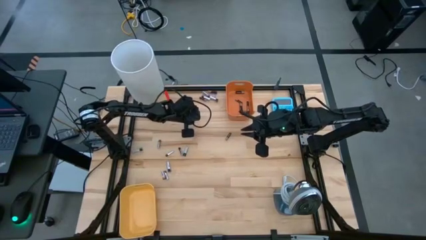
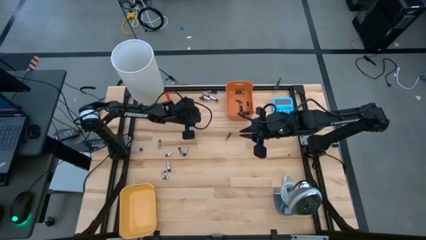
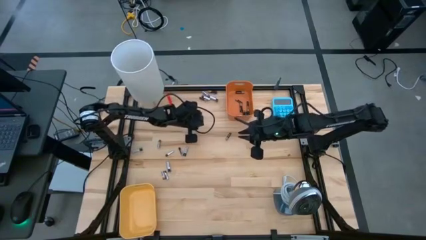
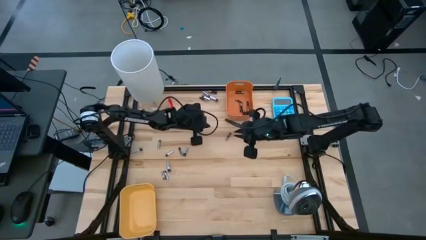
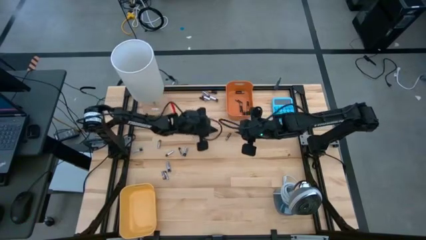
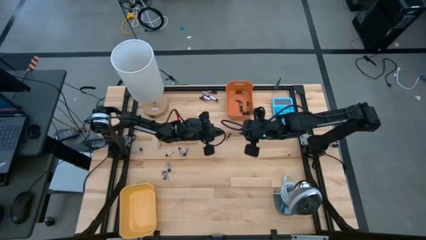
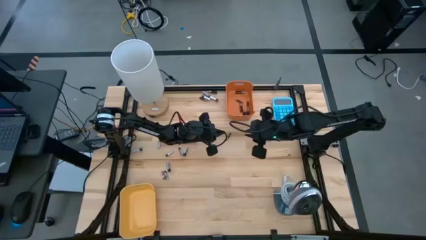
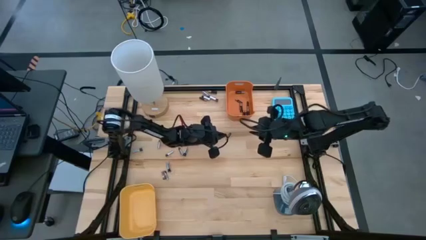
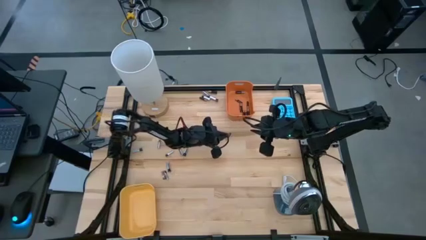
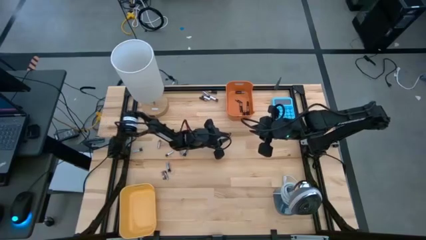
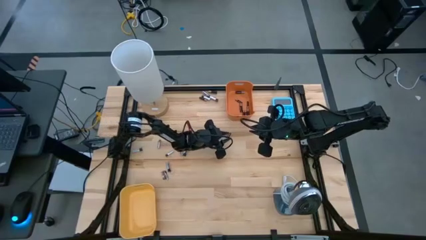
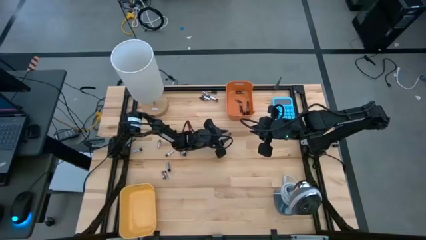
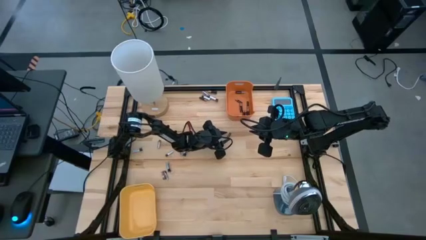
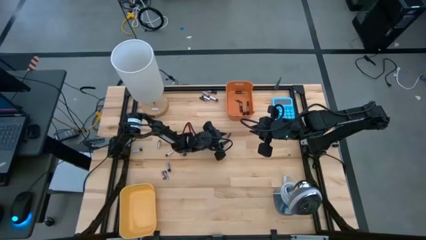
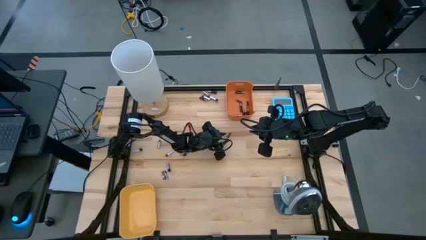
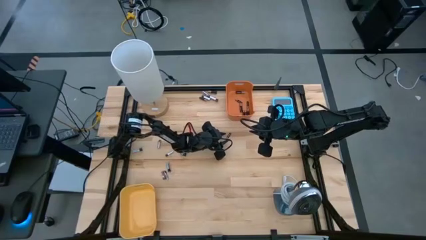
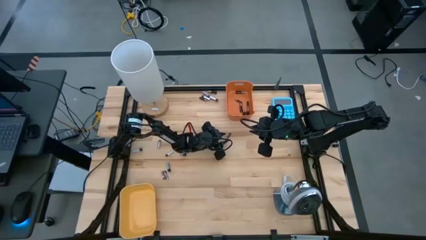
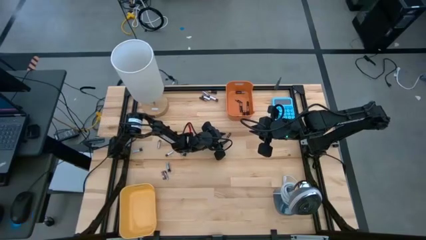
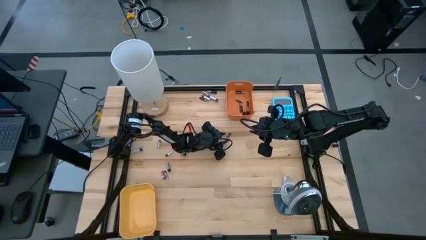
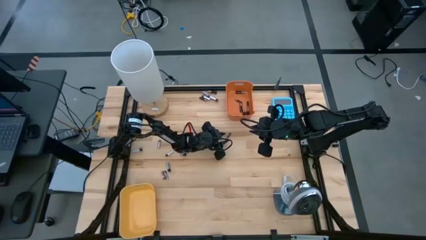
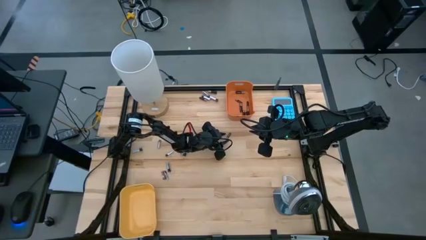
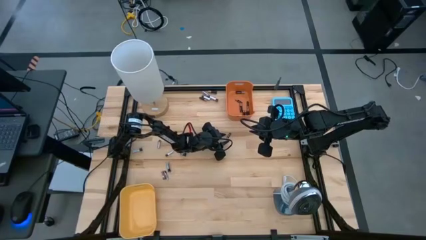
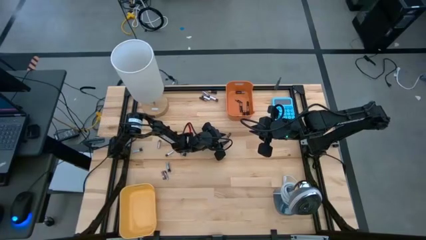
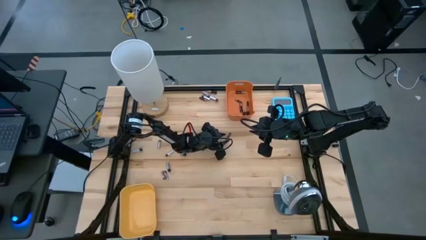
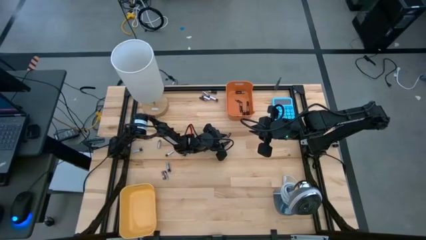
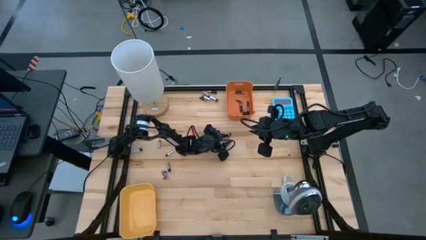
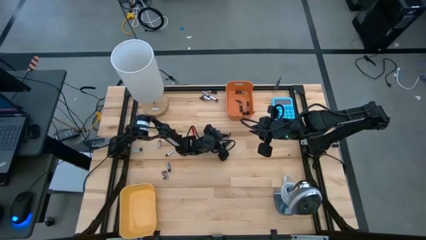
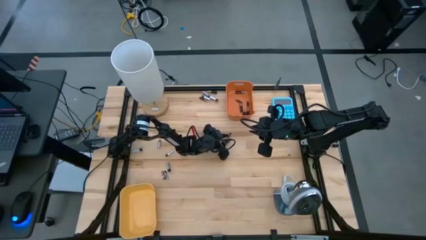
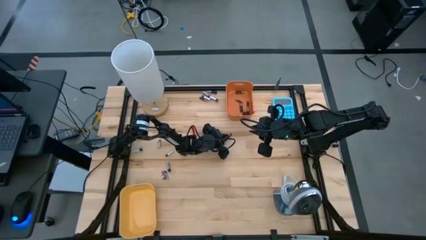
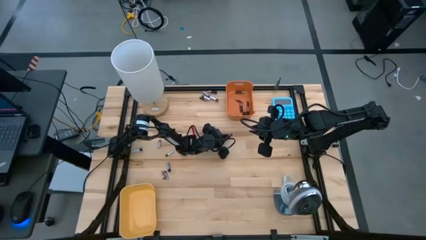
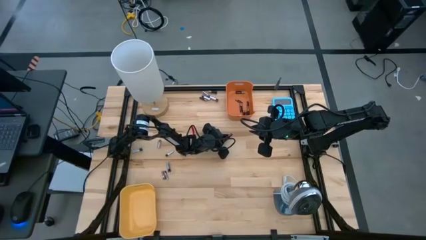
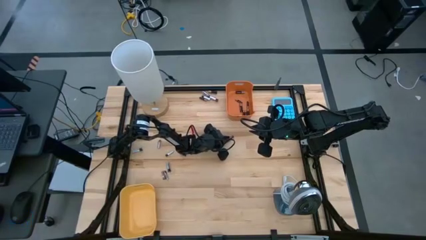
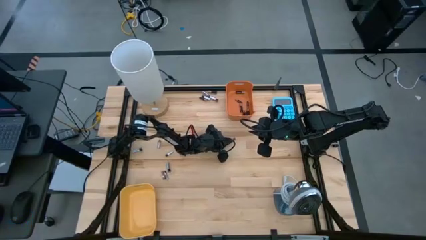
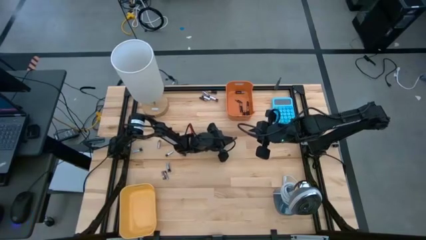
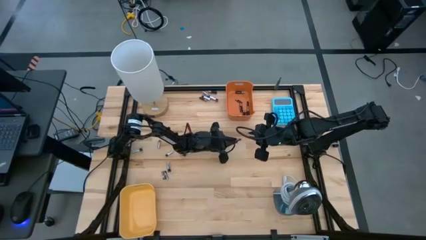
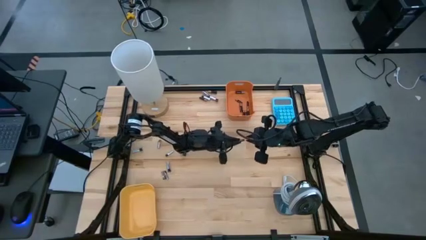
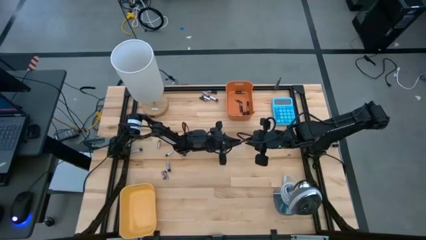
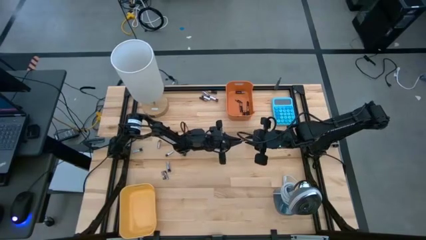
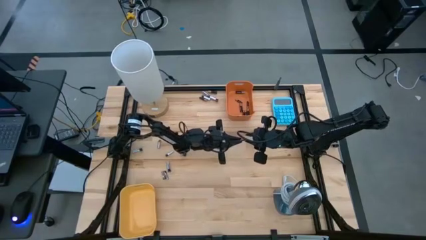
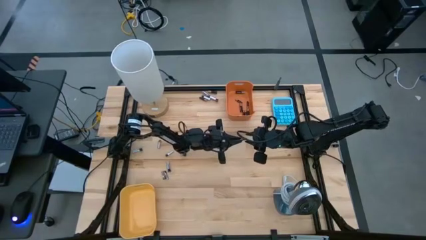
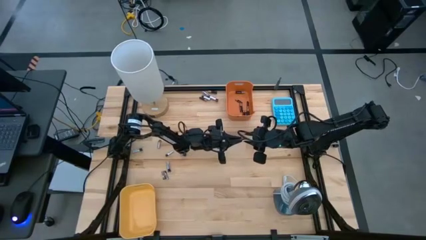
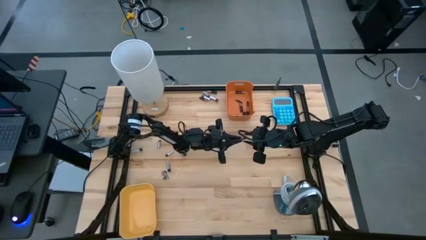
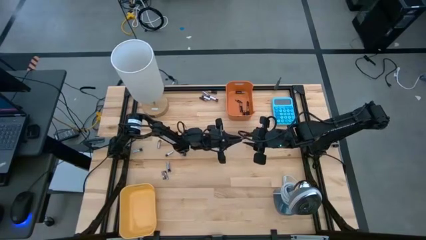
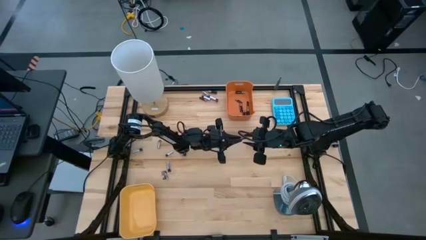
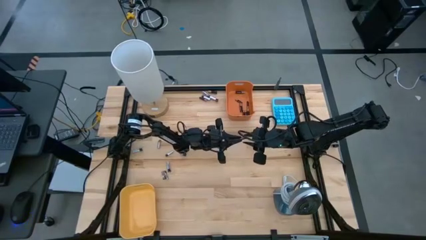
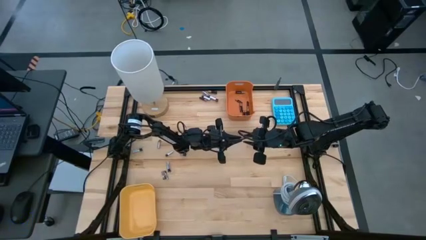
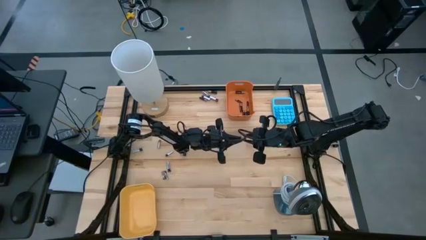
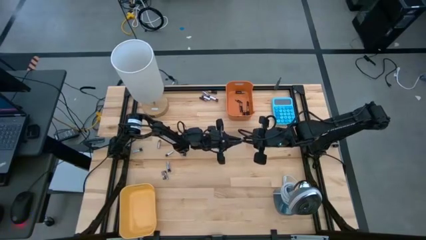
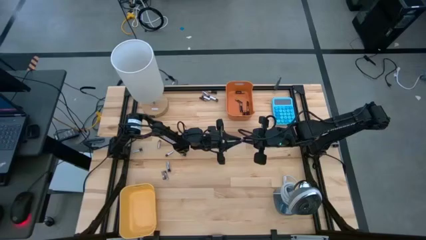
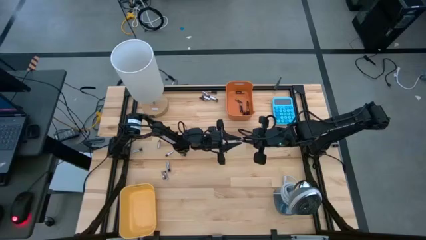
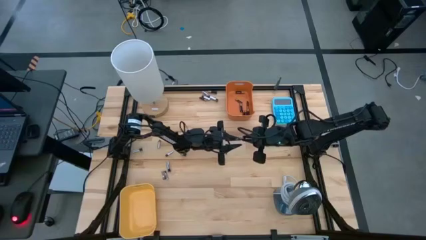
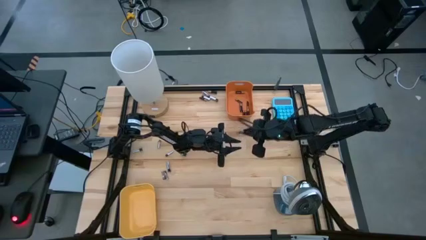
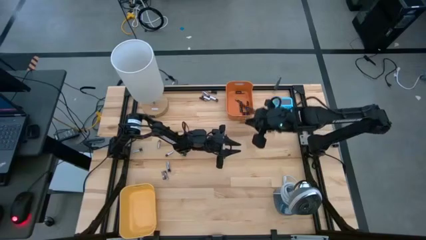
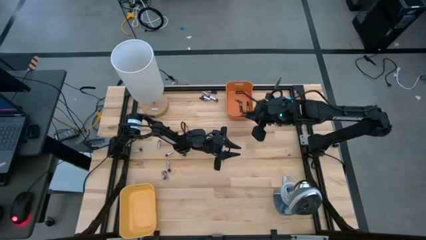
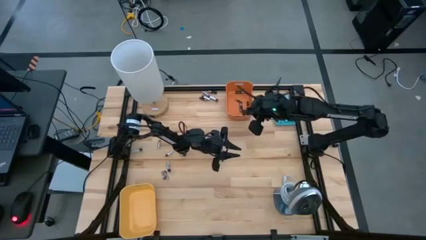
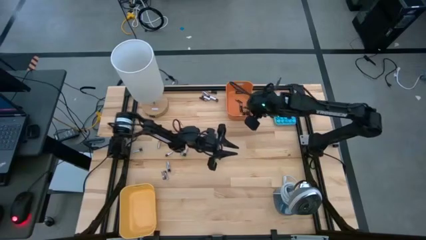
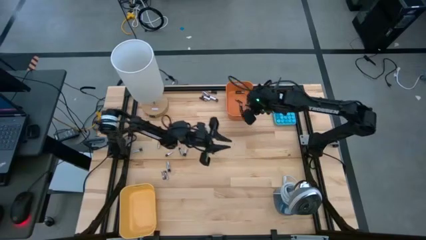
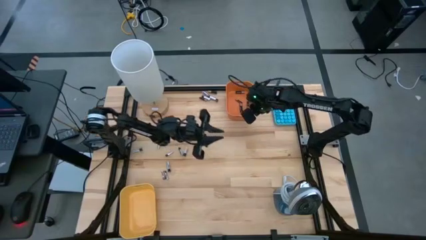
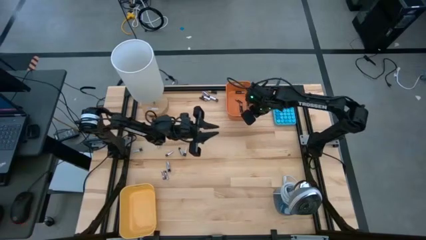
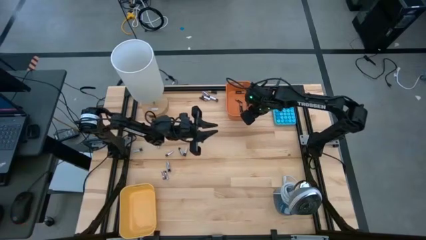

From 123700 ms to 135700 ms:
Task: Sort batteries
Put the black battery into the orange bin
